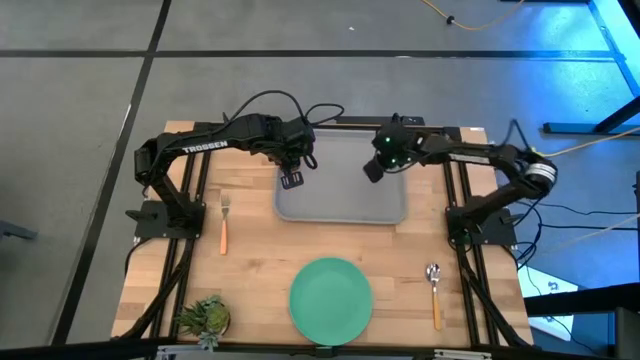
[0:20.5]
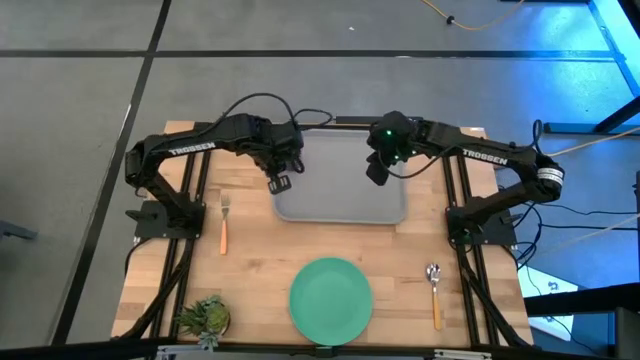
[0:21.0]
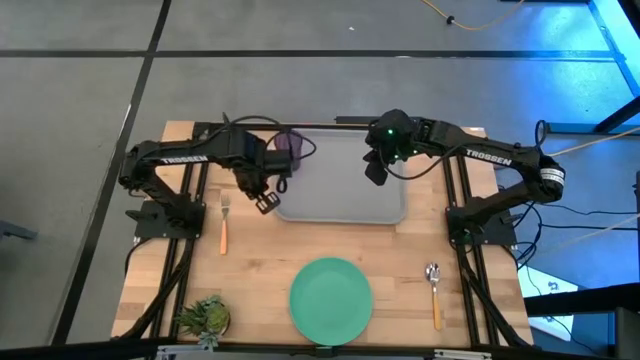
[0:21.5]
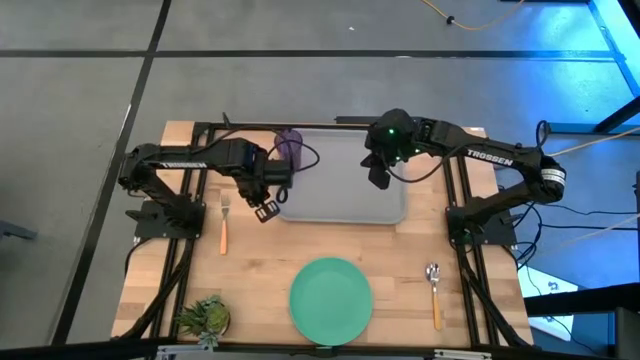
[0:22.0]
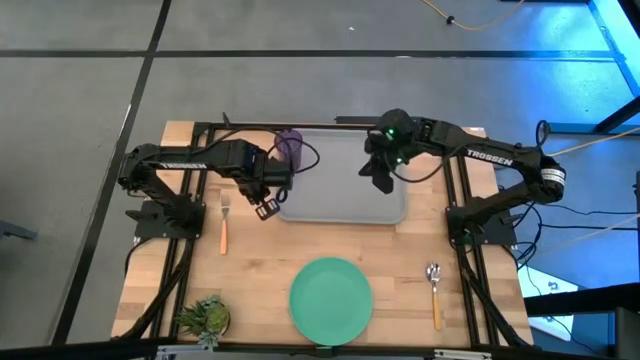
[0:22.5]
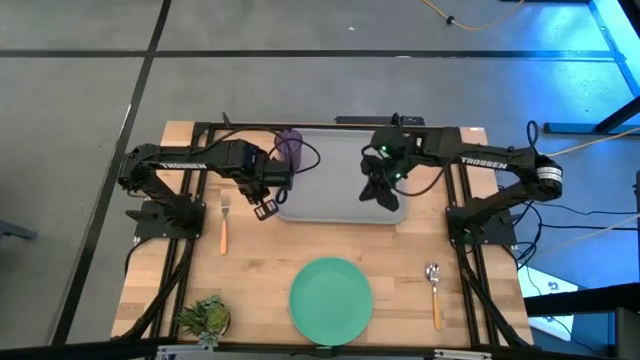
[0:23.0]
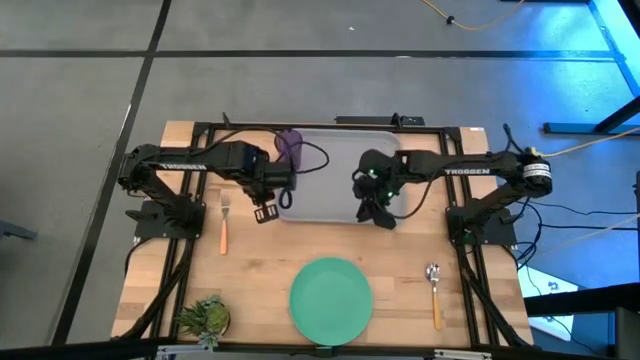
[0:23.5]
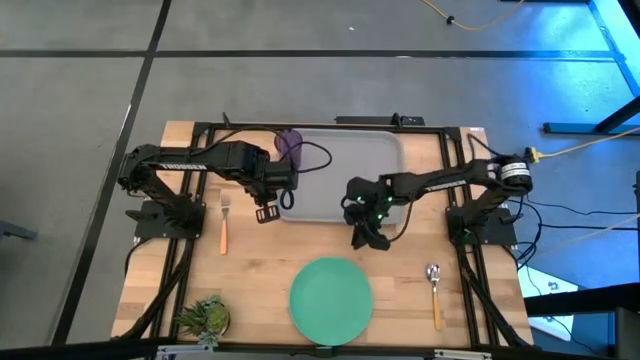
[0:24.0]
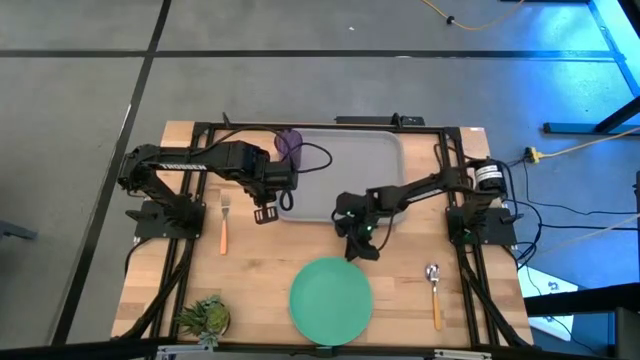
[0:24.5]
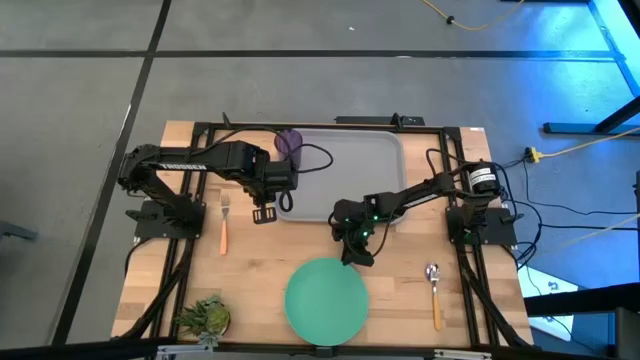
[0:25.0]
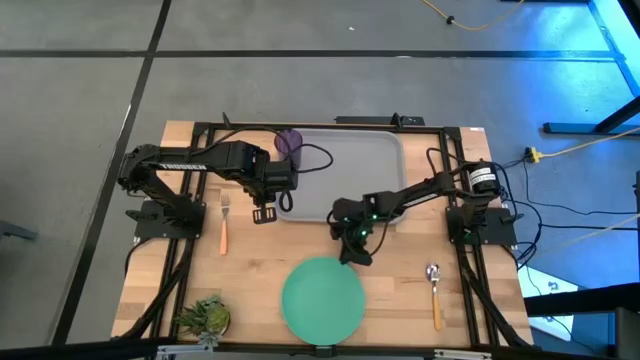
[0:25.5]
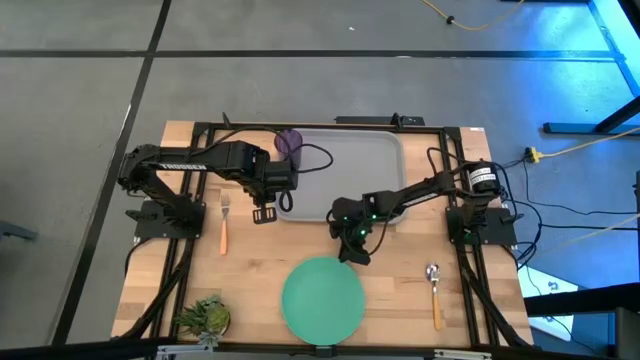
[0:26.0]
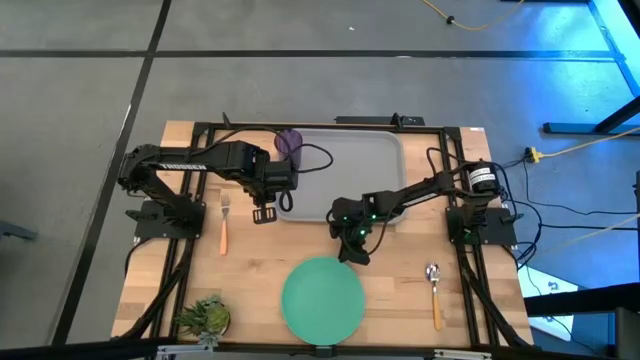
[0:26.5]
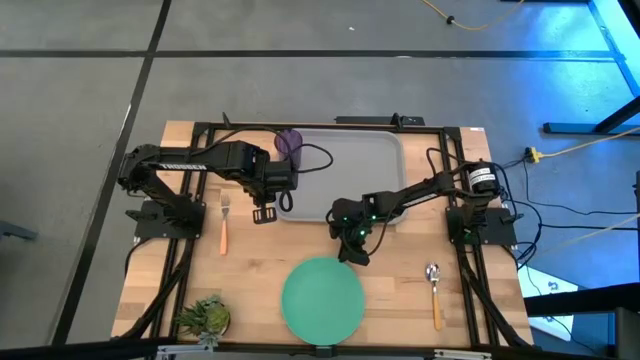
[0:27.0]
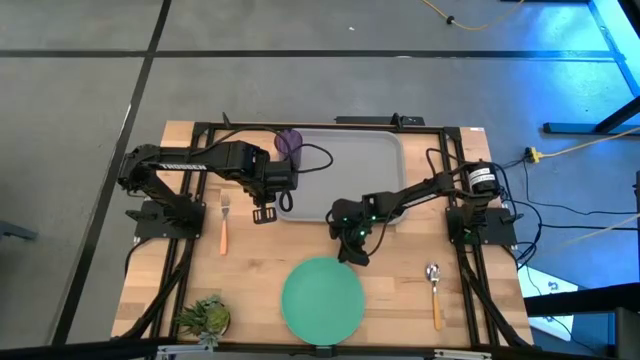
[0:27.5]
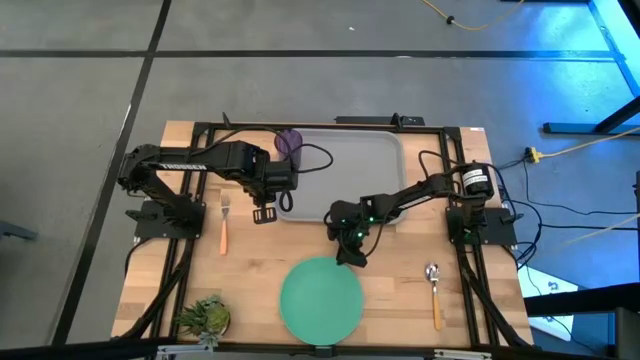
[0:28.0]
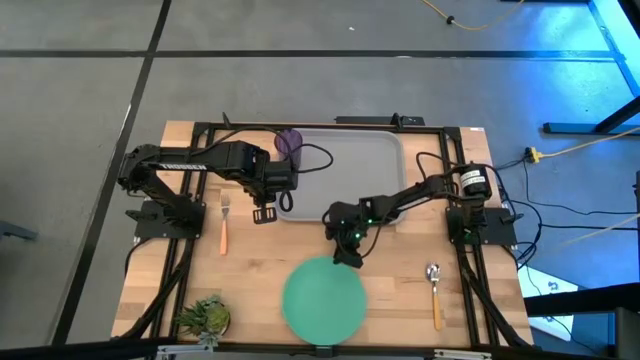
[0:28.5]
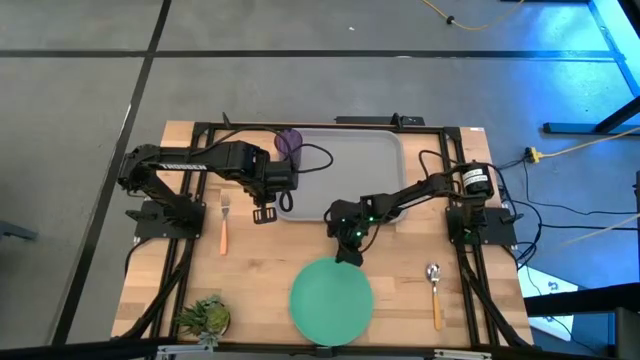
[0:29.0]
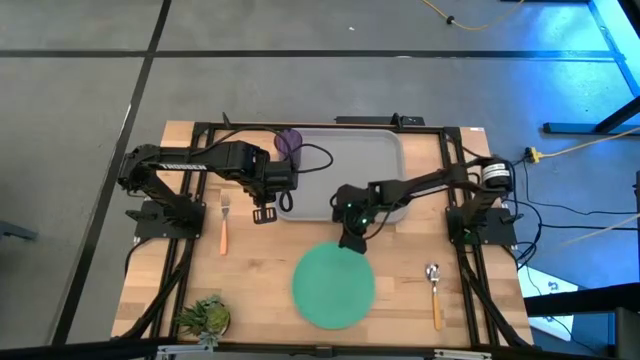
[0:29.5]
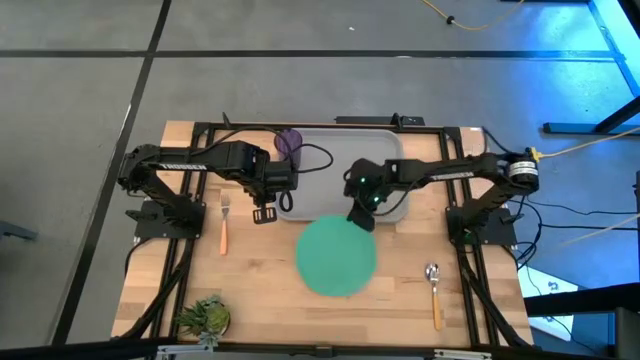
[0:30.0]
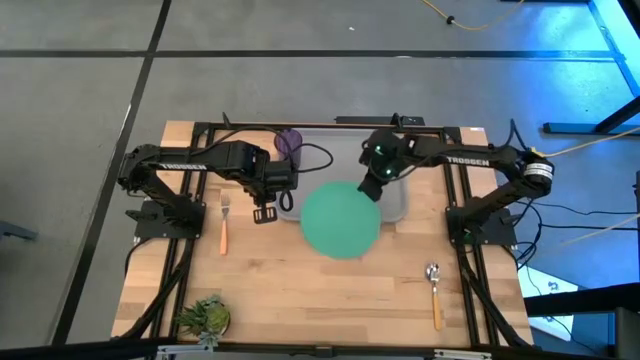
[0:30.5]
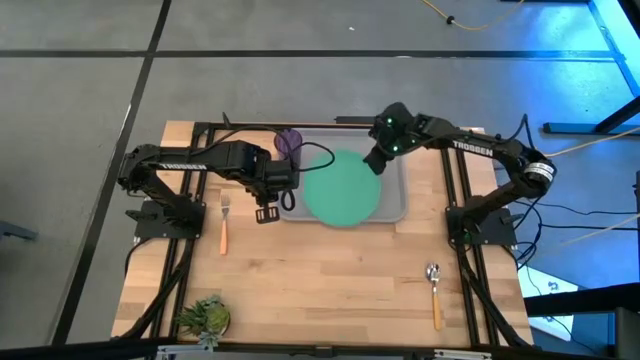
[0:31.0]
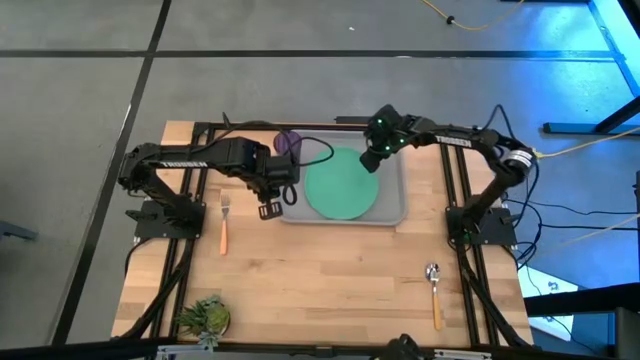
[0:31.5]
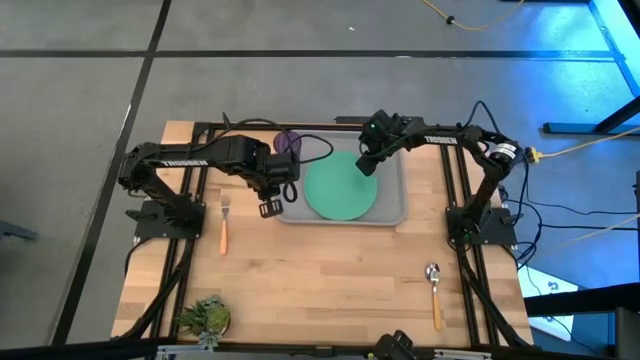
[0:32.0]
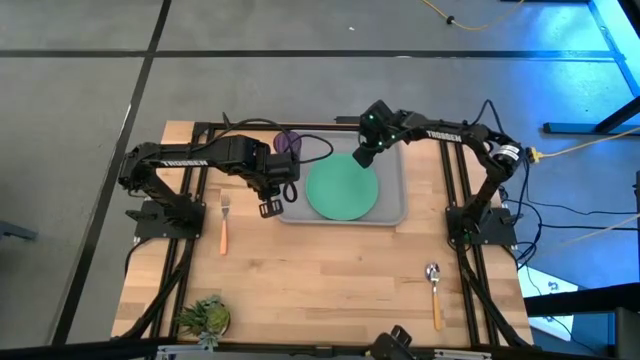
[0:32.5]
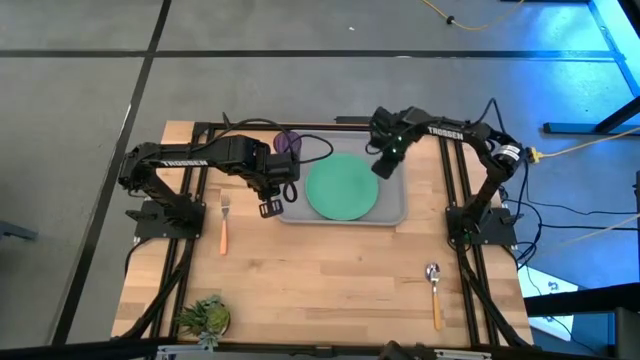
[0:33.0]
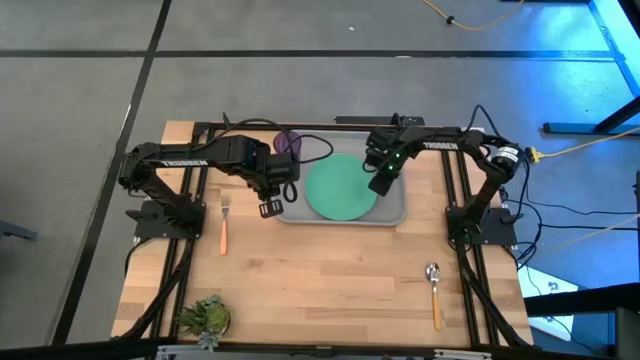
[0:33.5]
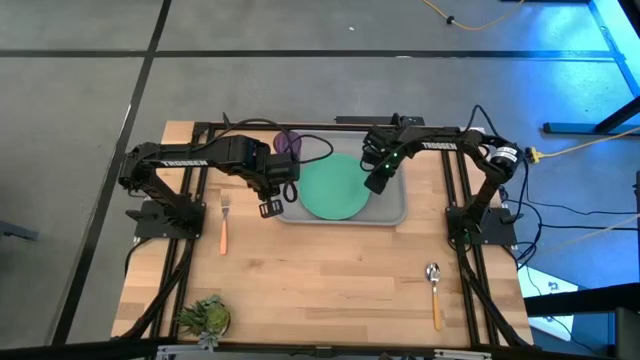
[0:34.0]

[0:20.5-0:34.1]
Task: Pick and place plate/cup/fork/spoon on tray
Put the green plate on the gray tray to the bottom right of the purple cup

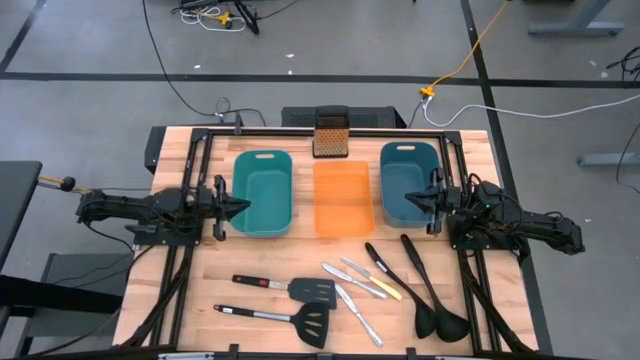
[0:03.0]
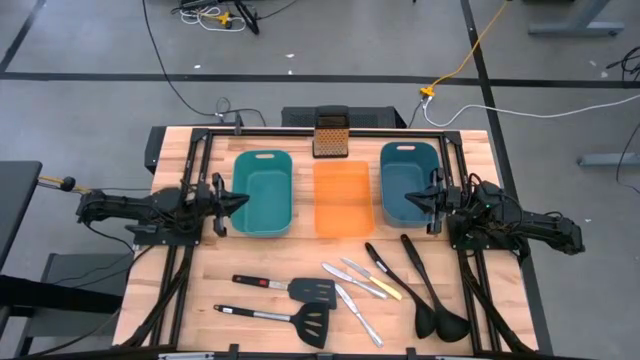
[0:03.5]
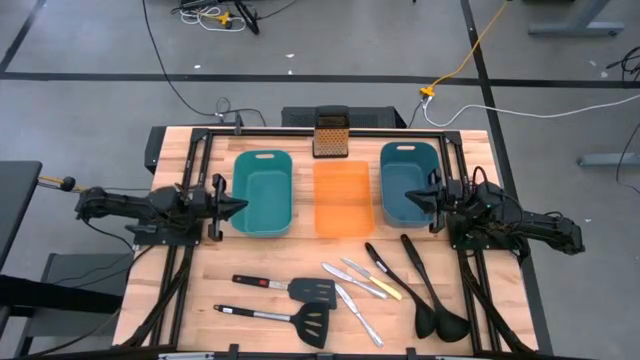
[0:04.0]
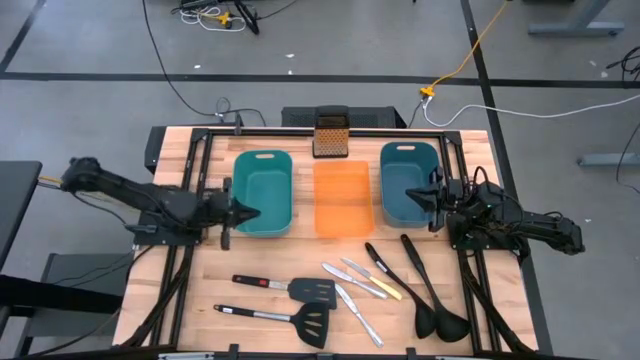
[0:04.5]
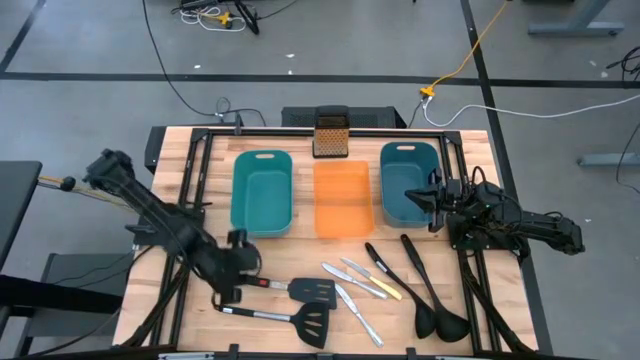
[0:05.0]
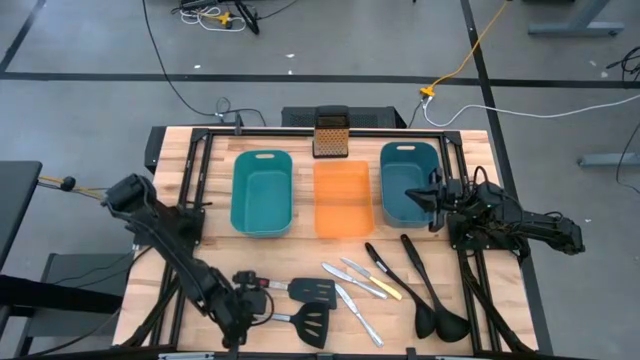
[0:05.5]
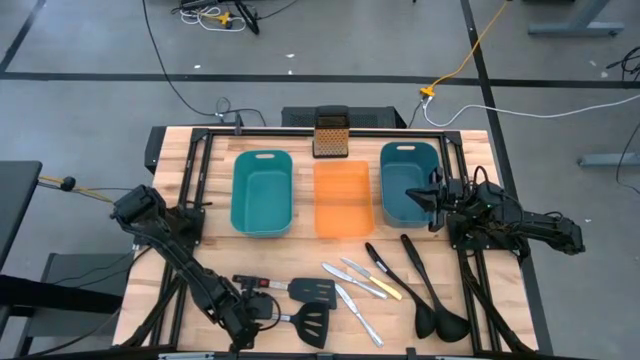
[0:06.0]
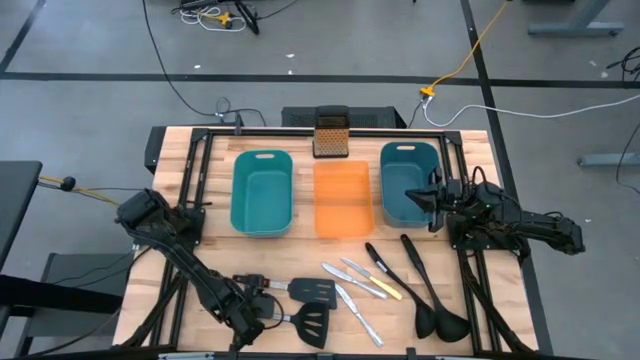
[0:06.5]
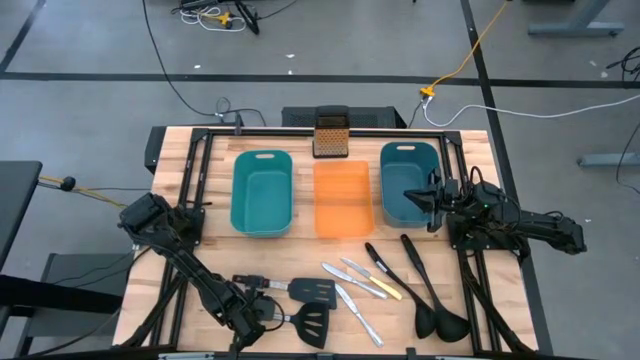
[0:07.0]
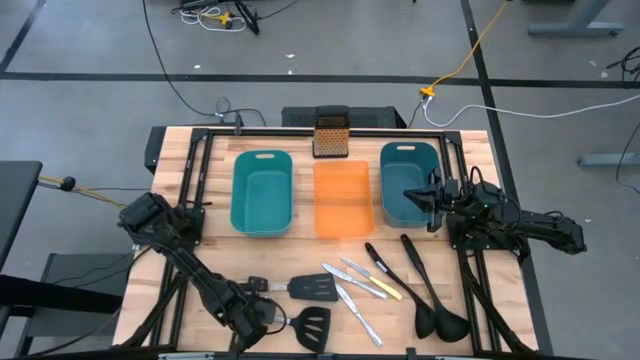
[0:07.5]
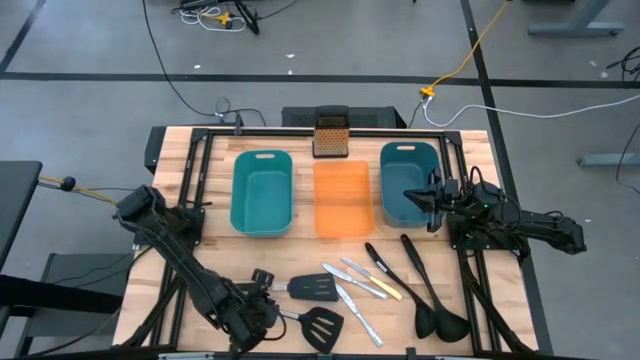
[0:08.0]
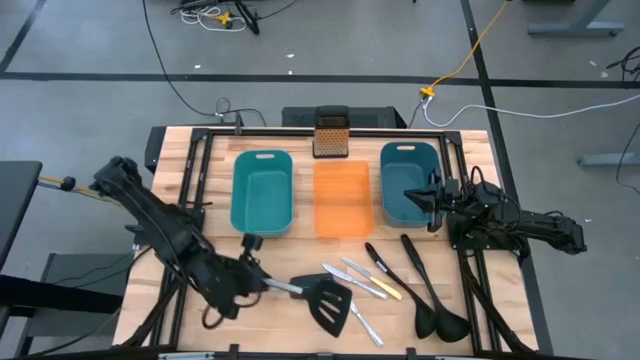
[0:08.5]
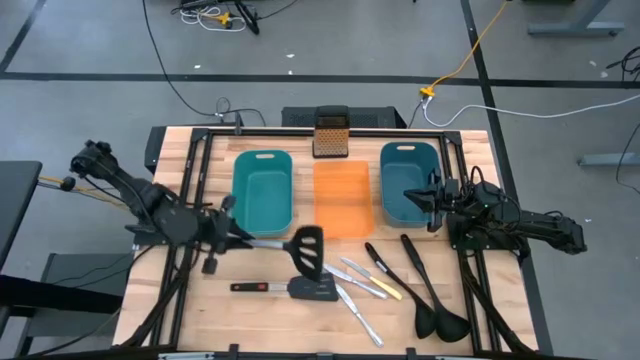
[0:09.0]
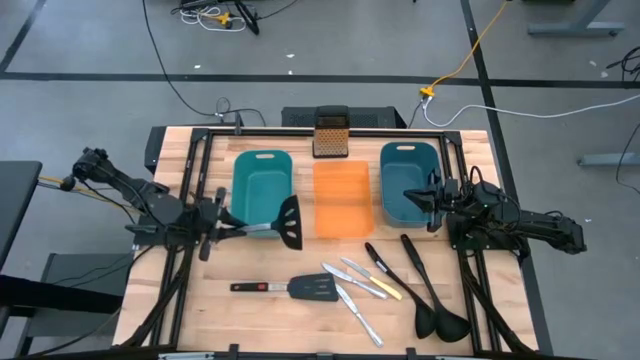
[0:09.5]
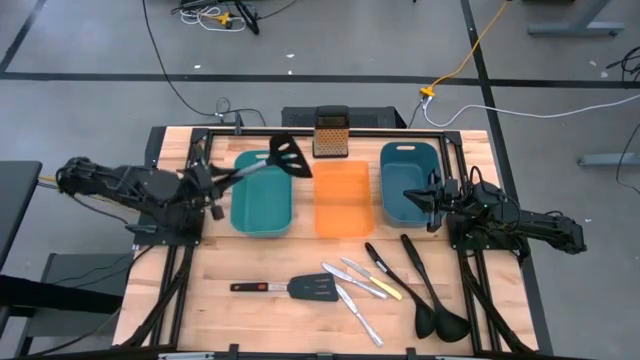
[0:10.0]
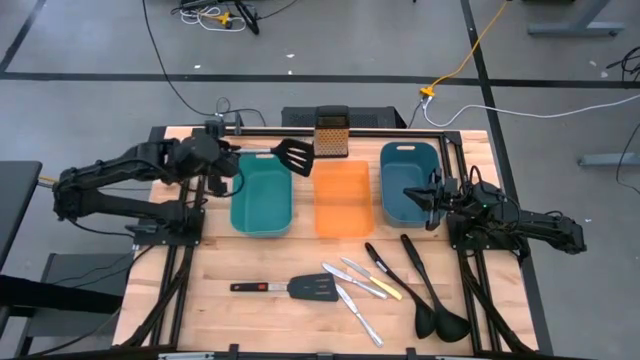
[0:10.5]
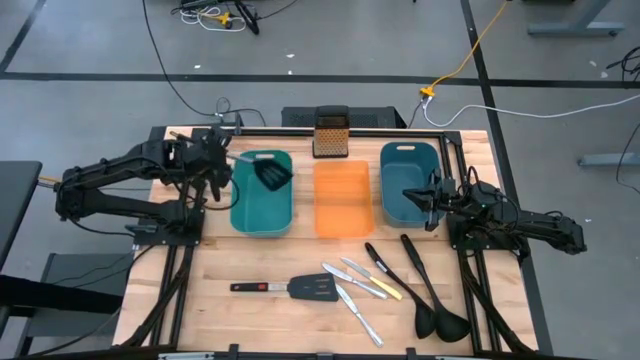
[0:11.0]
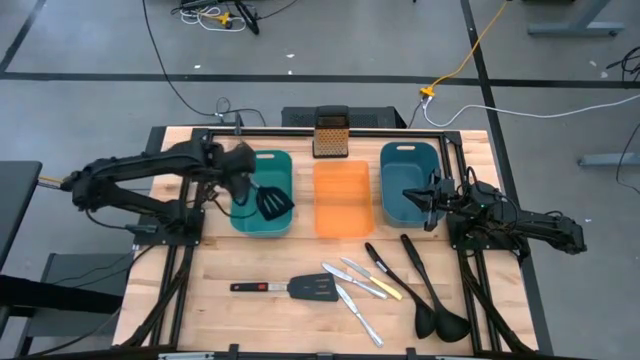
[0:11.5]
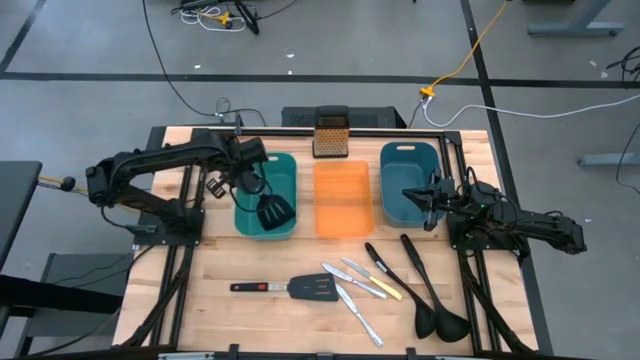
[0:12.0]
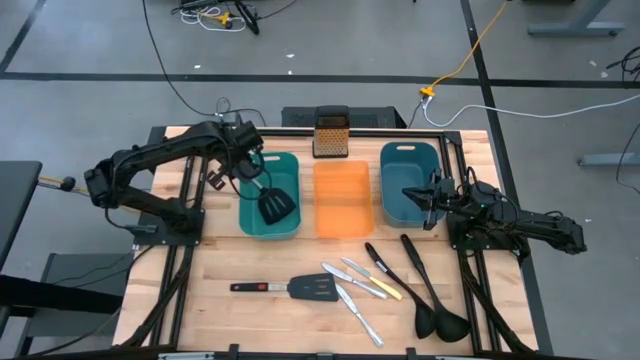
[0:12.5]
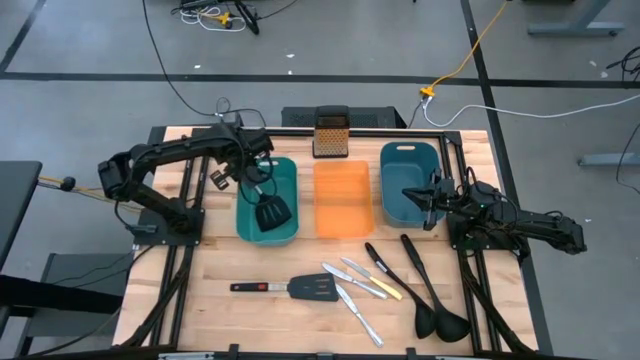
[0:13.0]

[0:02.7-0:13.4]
Task: Pick & Place Kitchen Items
Put the bottom black spatula into the green bin
